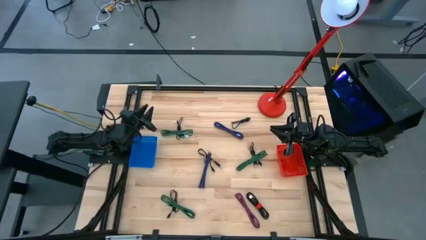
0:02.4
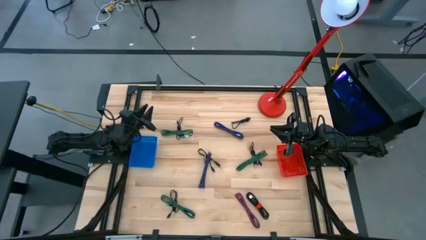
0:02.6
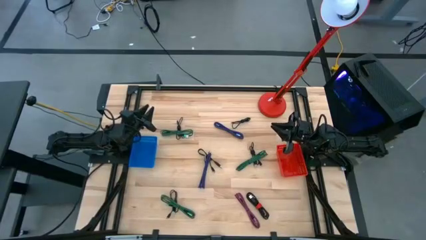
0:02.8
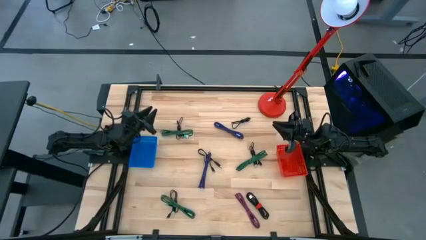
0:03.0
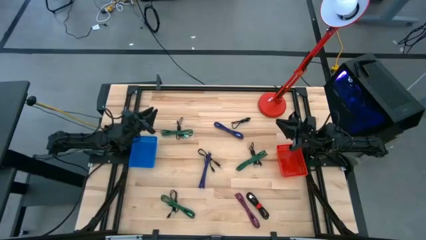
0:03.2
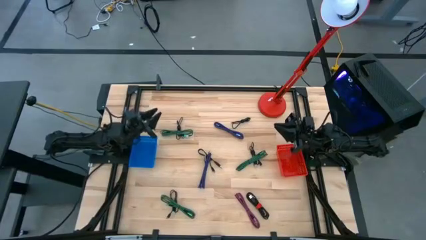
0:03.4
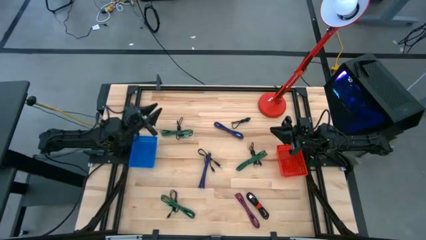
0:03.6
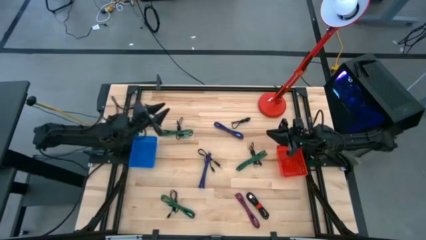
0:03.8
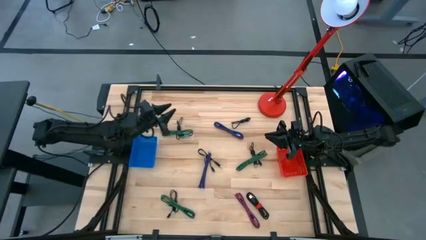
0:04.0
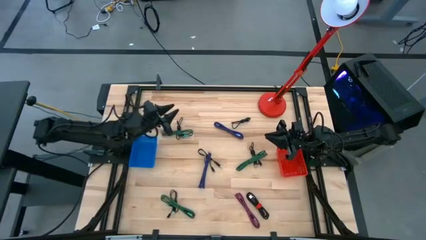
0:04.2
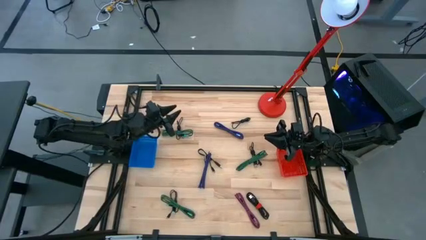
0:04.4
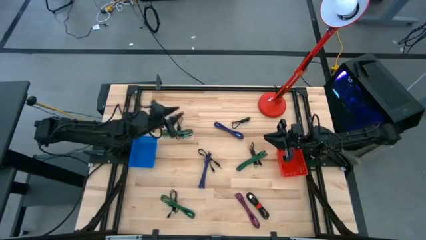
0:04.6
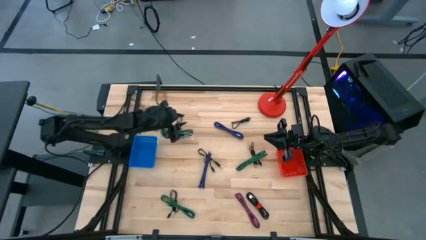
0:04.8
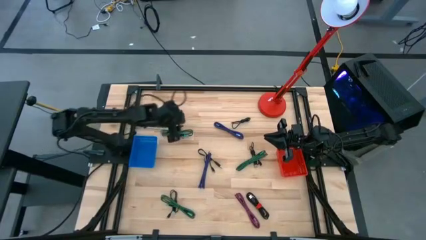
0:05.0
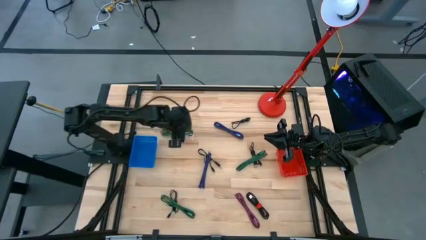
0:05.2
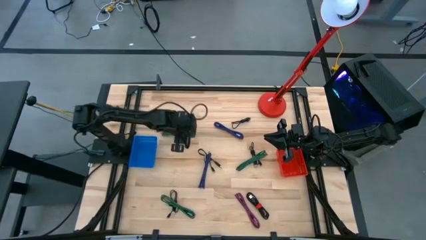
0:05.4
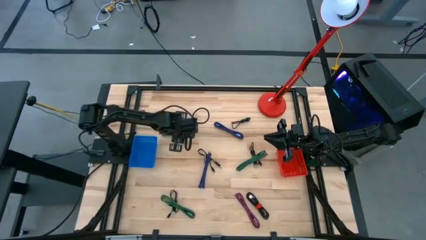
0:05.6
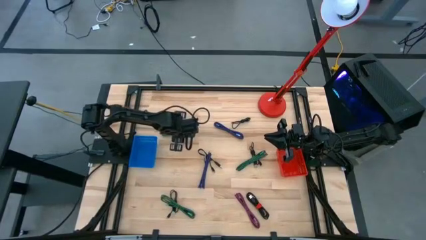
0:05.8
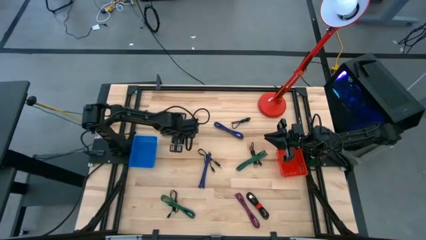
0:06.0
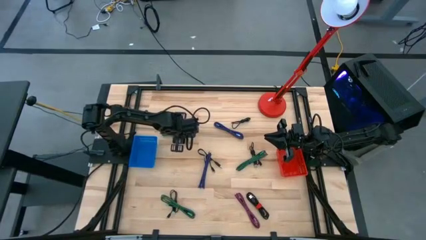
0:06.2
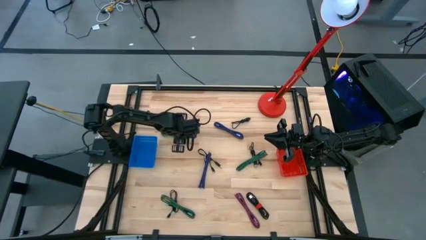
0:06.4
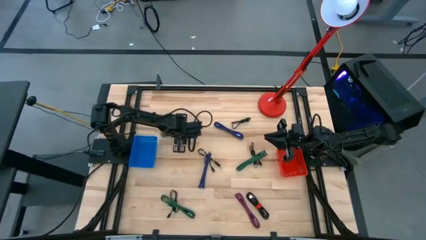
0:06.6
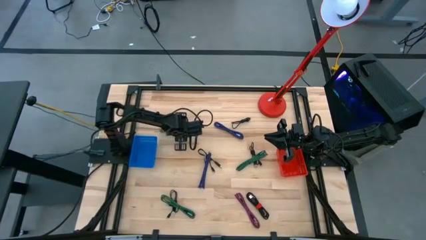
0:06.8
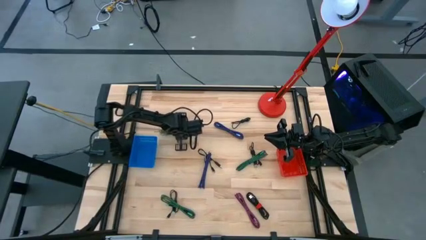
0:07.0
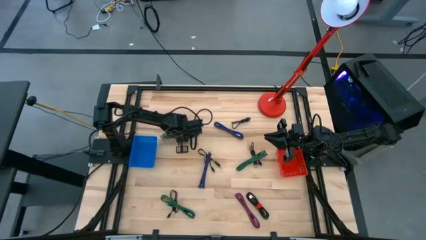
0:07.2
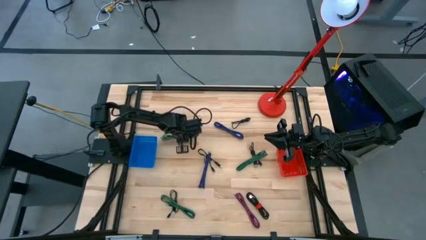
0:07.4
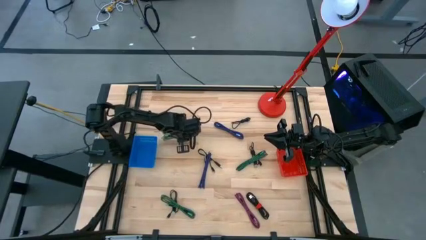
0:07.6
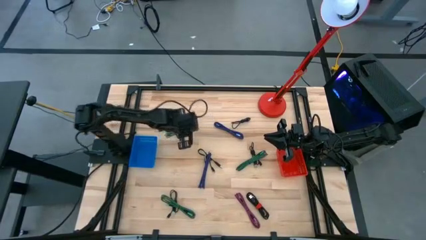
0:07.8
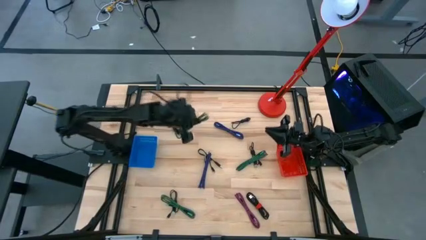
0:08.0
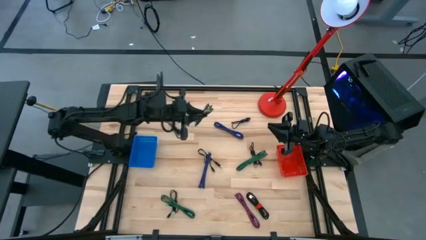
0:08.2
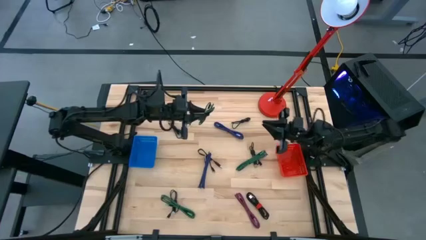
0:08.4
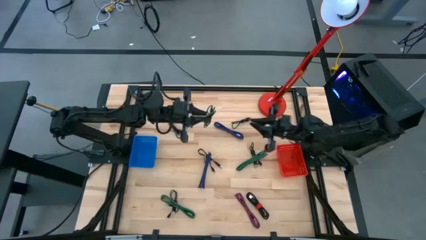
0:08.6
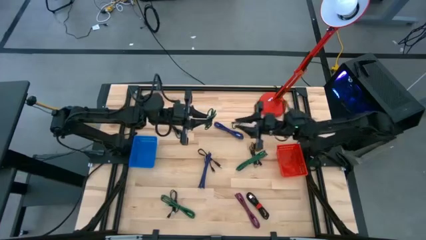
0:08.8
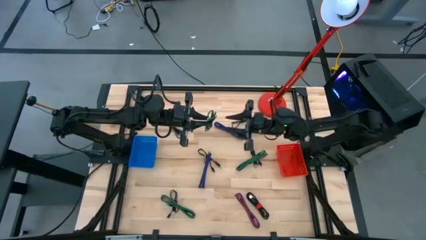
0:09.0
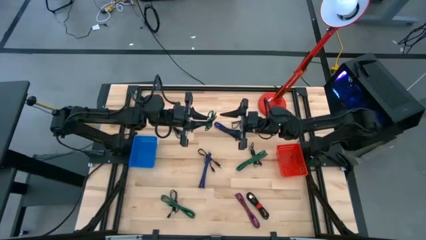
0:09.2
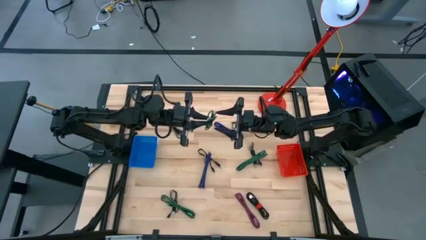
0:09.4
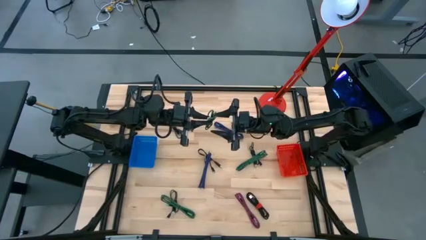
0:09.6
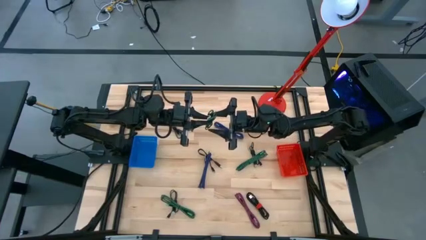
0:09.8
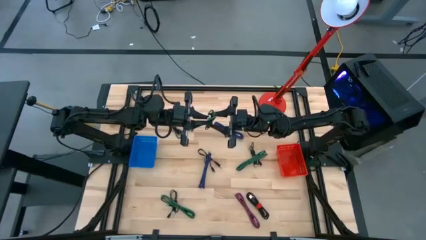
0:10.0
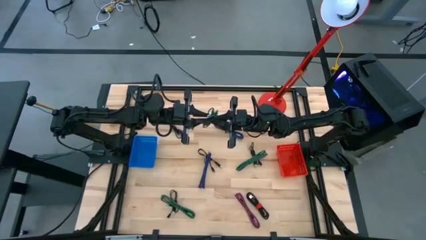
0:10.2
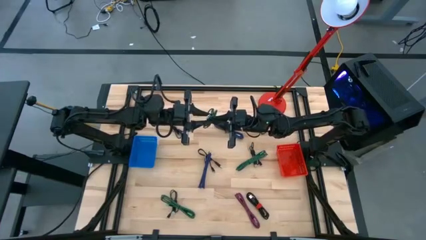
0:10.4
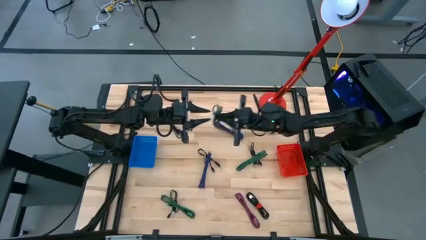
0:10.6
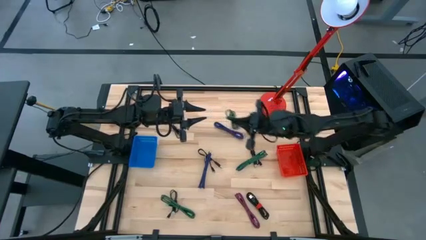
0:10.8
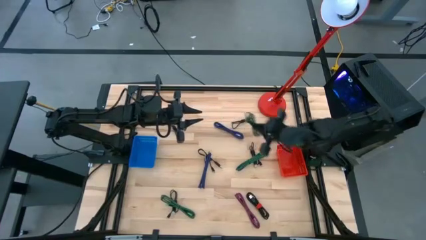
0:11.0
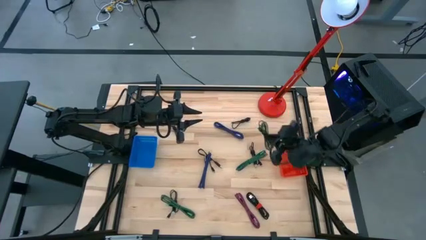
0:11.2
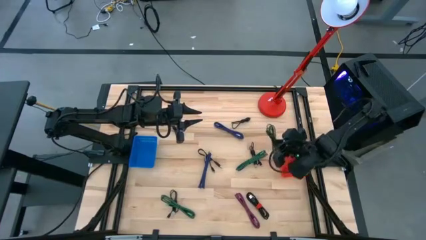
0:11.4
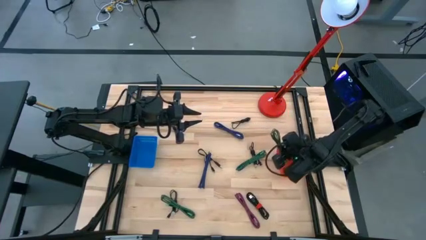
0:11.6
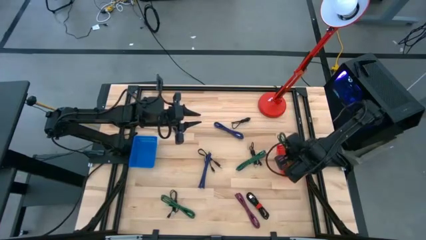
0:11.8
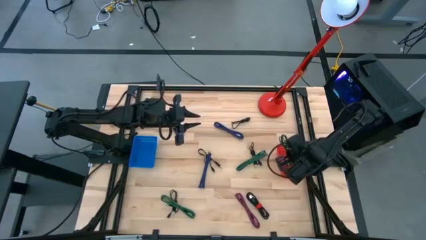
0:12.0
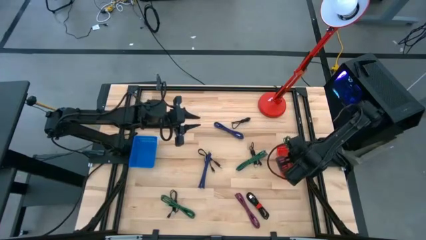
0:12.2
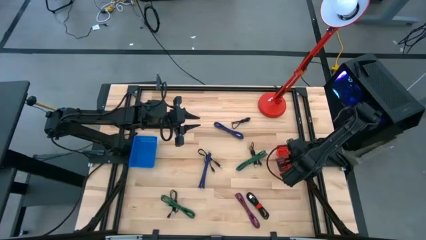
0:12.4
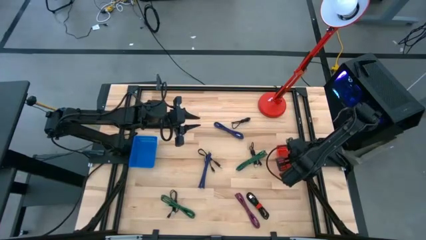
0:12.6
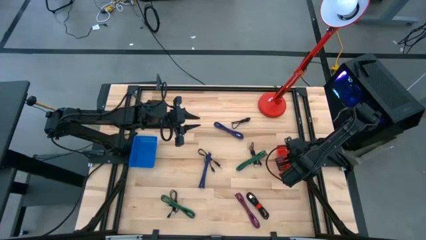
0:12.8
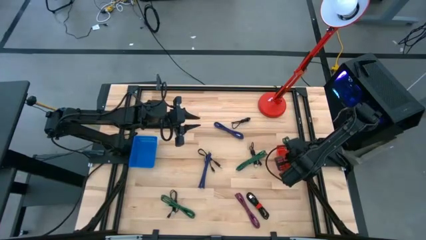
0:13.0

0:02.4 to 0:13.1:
Task: Pick & Place USB Port
Put the black and green charger cable into the red basket

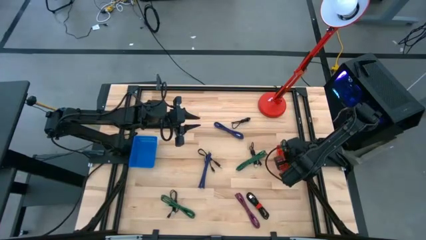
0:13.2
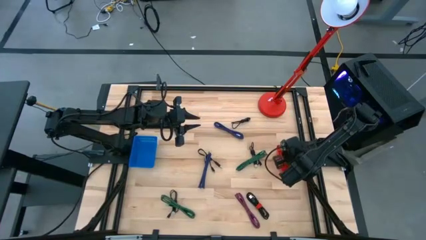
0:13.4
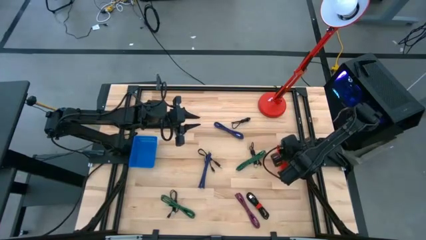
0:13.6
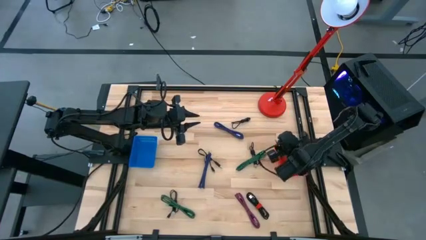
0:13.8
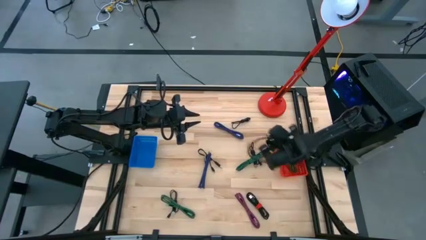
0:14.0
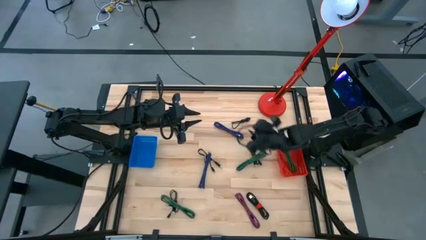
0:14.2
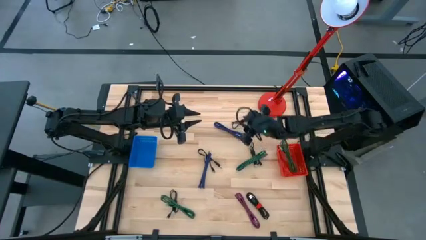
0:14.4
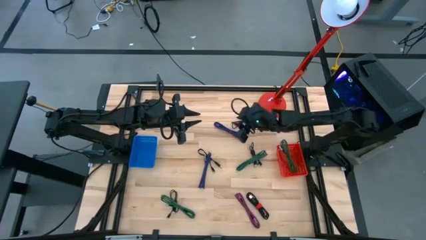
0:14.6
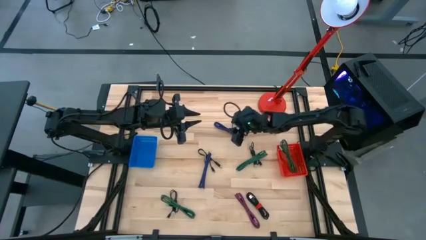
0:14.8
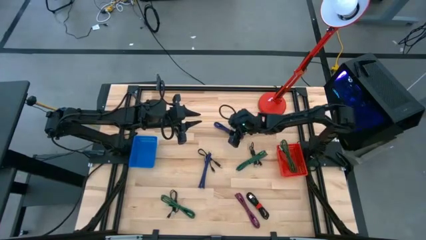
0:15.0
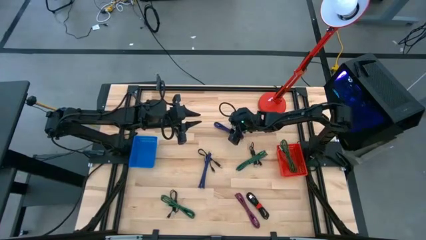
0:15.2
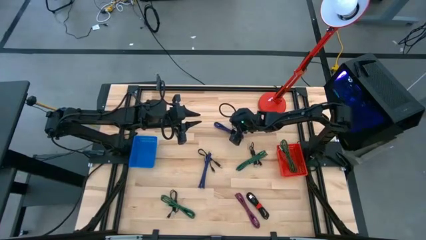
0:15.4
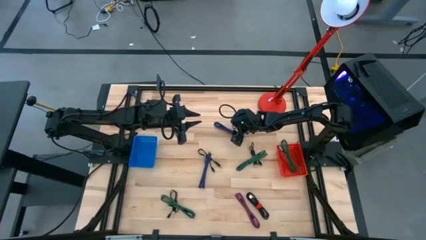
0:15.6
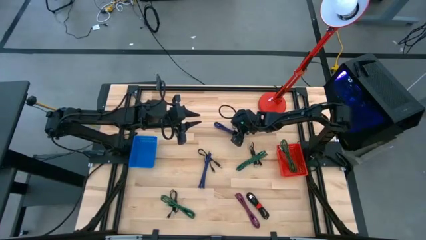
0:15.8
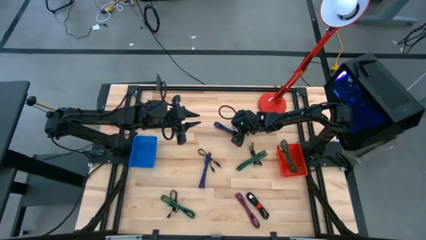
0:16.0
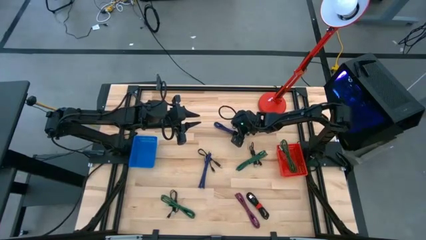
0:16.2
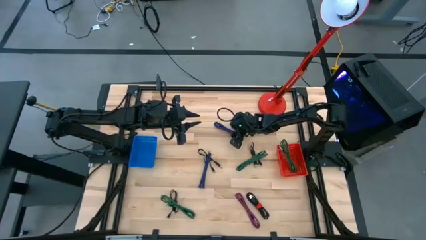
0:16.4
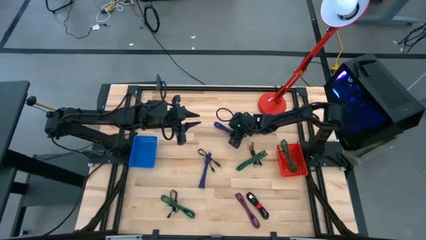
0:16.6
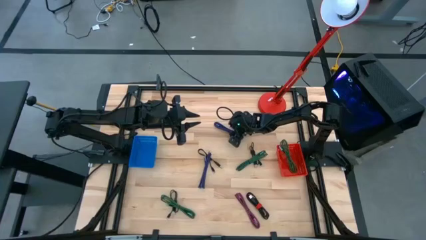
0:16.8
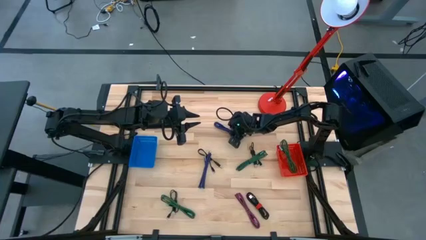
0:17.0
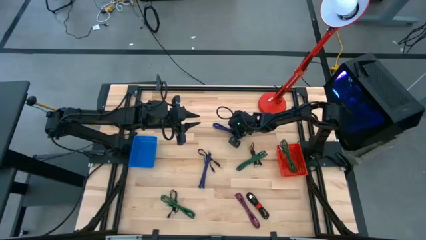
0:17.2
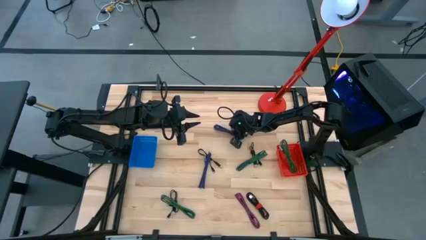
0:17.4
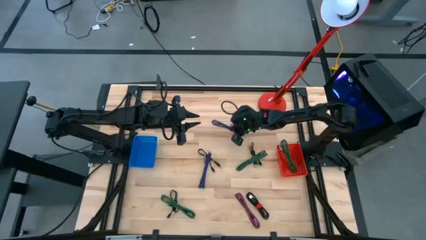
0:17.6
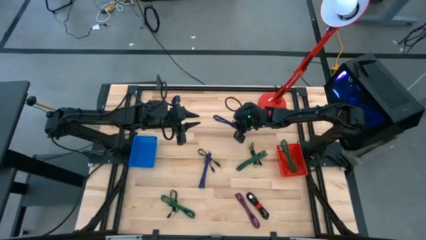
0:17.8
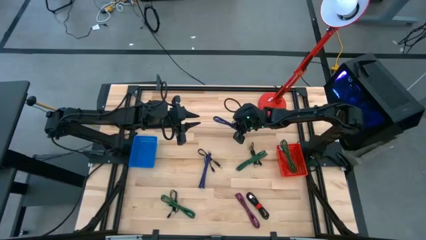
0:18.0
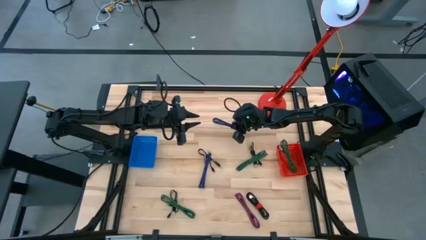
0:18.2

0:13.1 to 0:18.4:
Put the black and violet charger cable into the red basket
